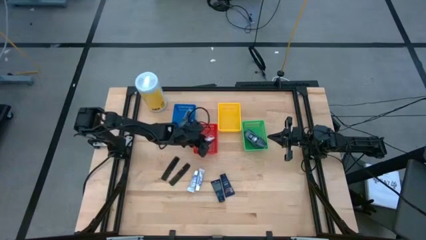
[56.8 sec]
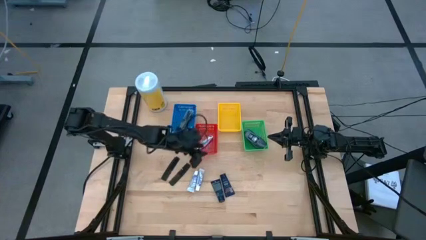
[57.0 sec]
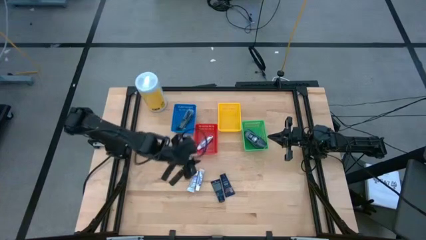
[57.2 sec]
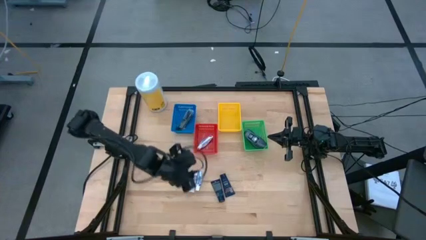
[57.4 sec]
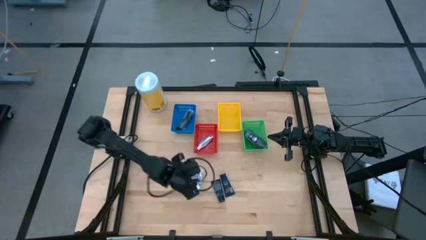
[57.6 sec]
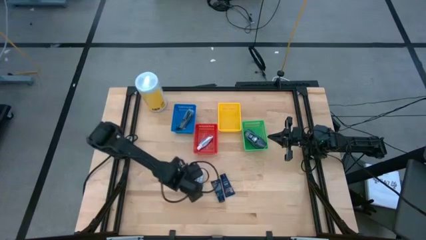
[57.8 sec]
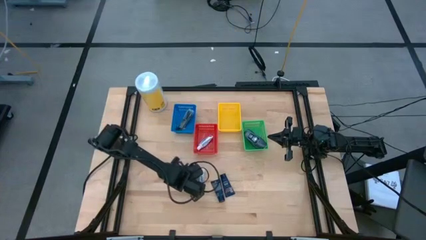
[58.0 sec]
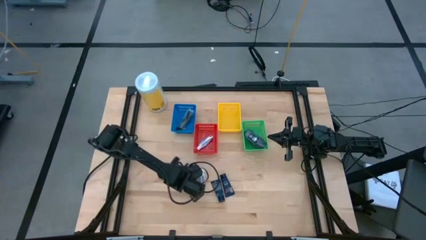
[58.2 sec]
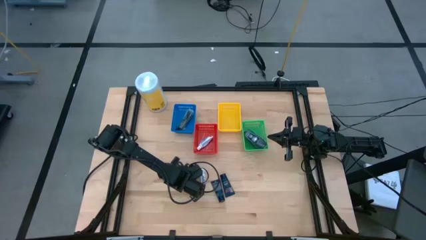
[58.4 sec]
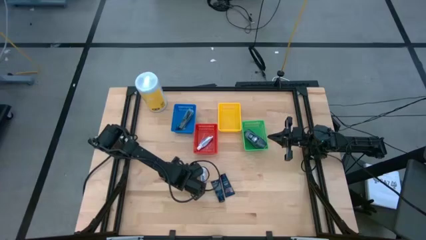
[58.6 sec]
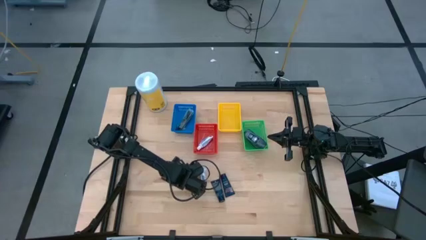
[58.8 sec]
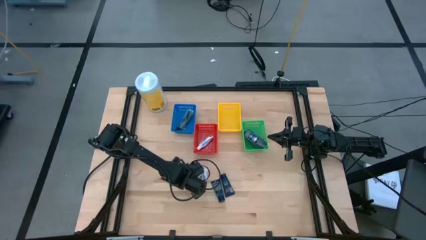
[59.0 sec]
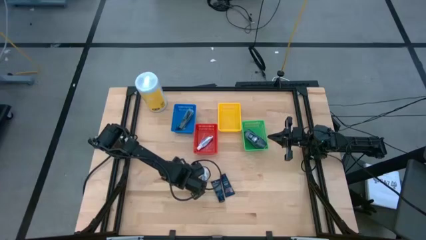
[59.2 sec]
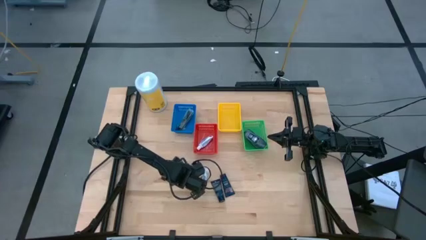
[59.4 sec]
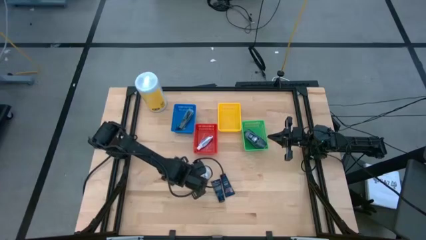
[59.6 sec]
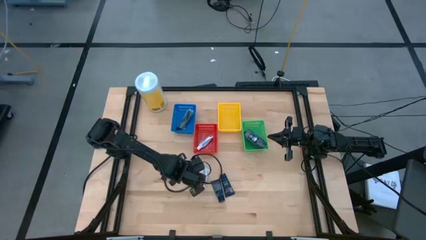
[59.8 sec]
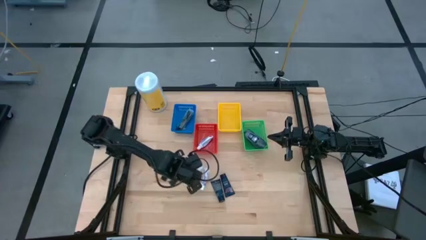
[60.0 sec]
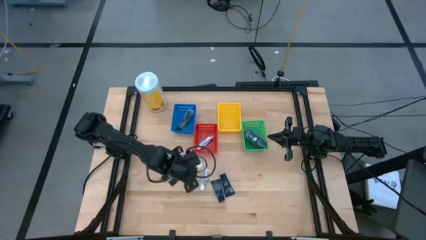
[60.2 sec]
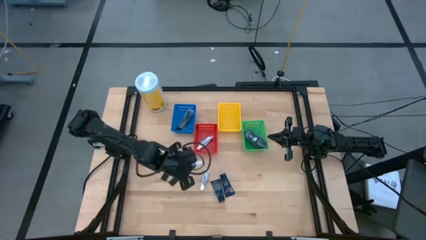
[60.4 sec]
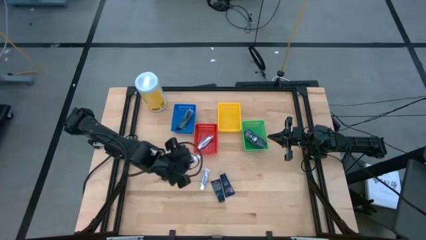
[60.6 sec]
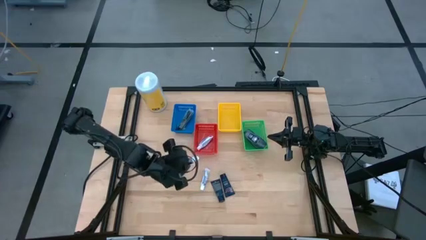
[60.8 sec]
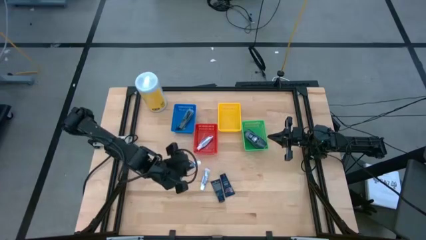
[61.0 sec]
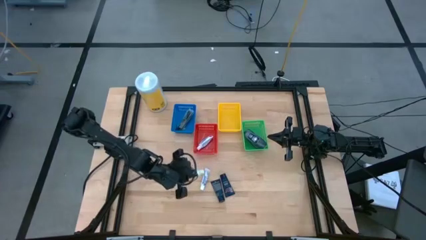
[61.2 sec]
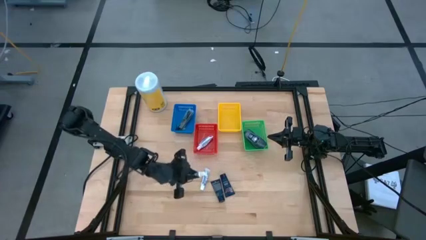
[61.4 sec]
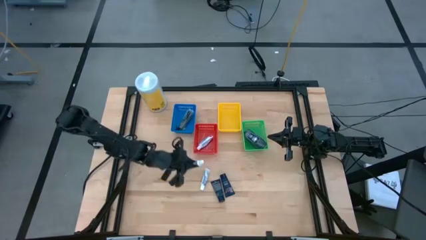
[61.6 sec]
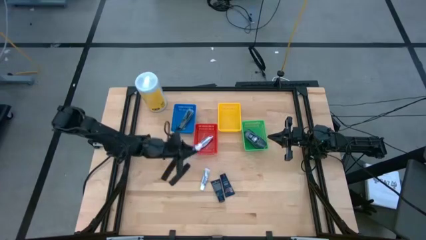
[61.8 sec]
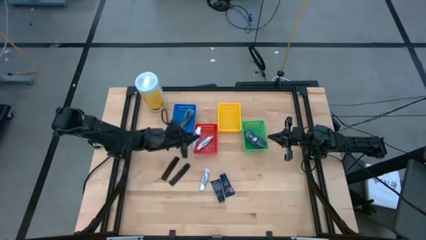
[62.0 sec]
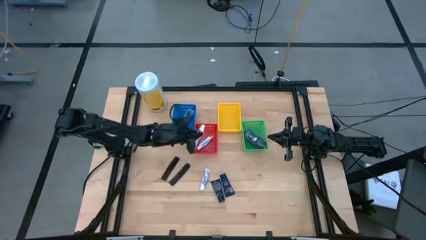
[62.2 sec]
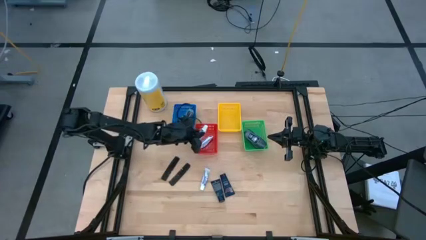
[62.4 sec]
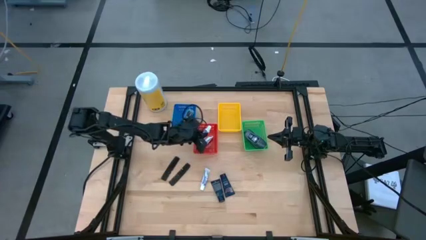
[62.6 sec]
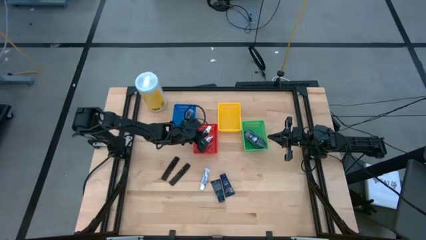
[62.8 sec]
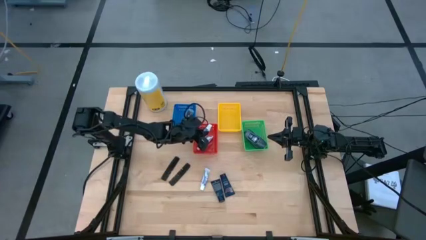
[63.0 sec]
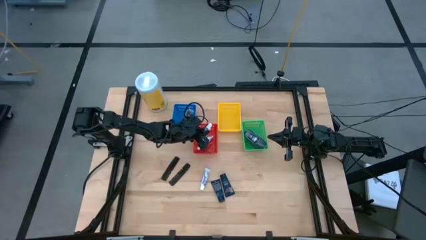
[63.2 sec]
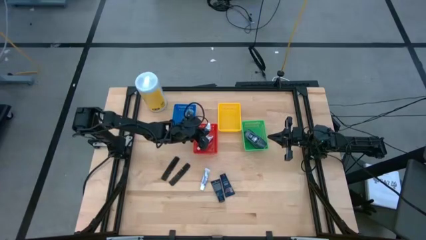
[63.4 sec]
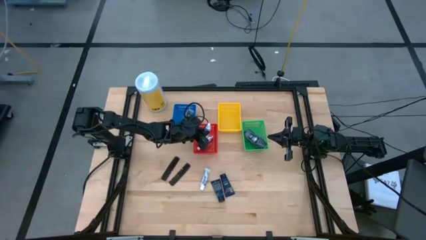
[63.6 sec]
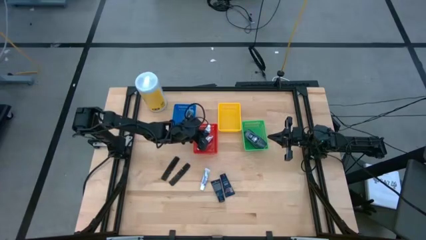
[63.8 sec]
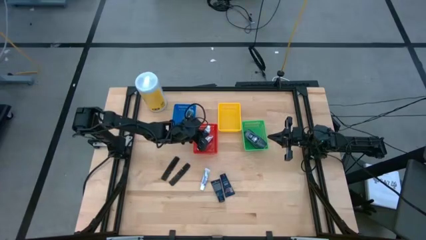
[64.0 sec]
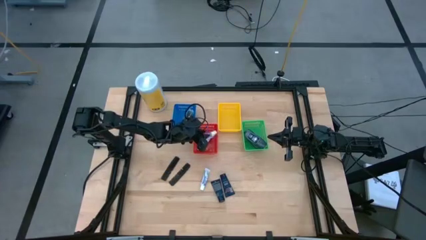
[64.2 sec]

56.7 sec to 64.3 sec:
Task: Pick & Place Travel size toiletries
Put the white toothpaste into the red bin

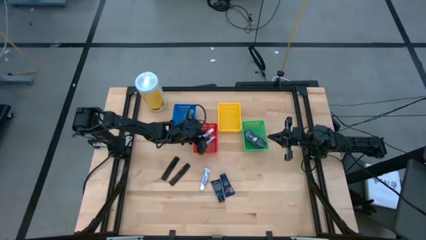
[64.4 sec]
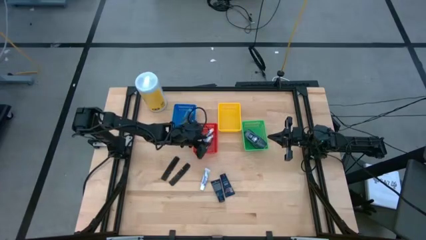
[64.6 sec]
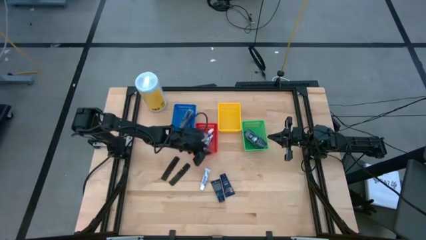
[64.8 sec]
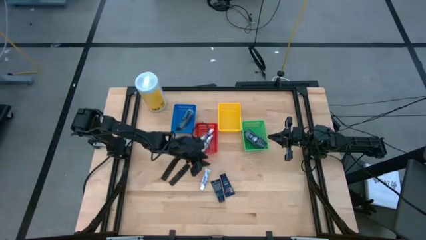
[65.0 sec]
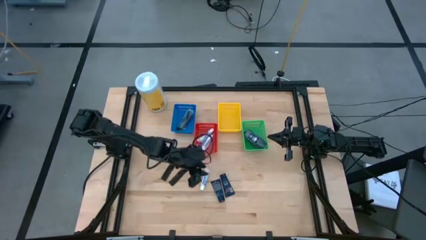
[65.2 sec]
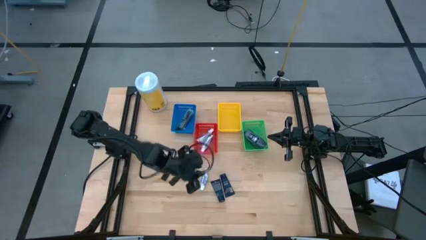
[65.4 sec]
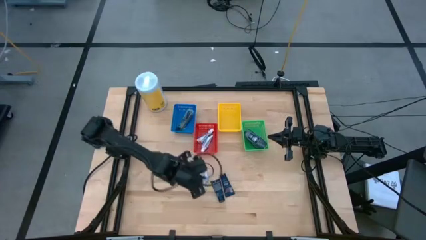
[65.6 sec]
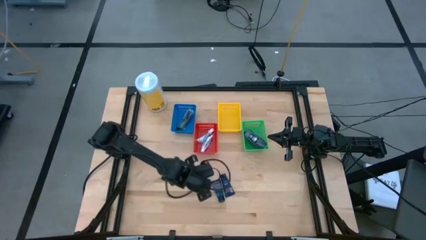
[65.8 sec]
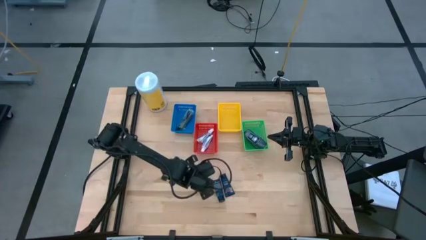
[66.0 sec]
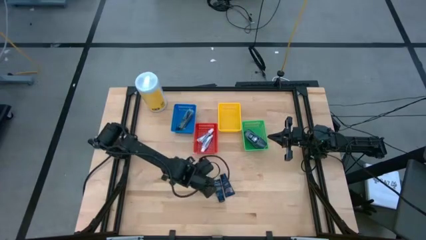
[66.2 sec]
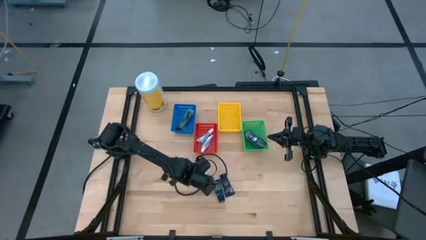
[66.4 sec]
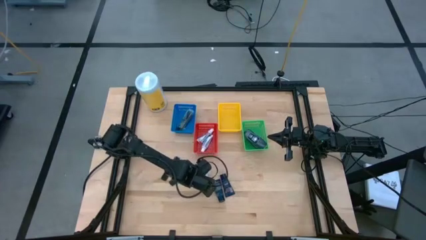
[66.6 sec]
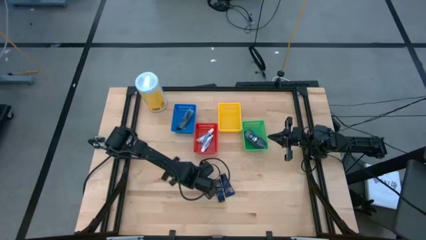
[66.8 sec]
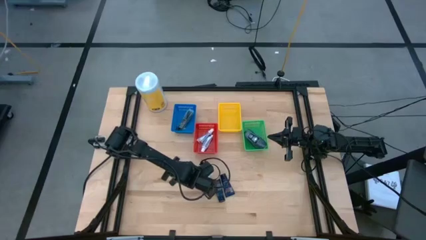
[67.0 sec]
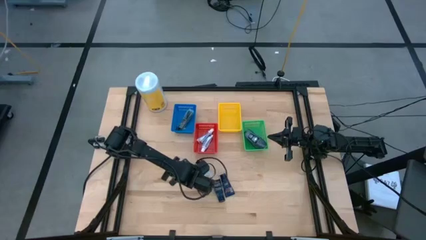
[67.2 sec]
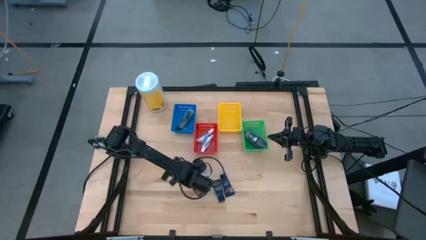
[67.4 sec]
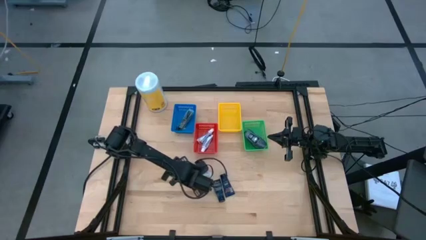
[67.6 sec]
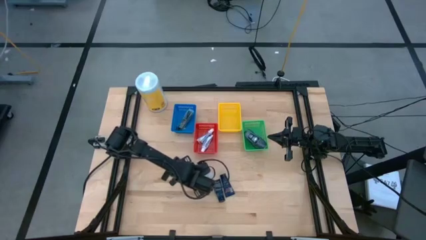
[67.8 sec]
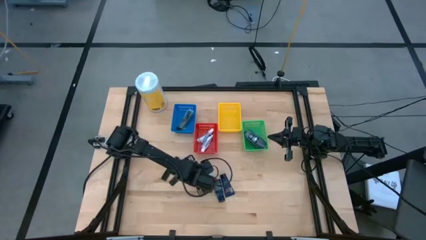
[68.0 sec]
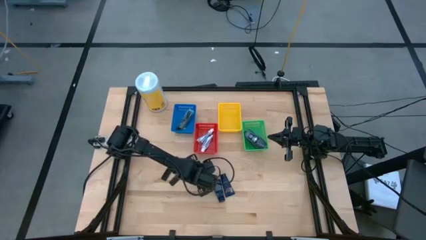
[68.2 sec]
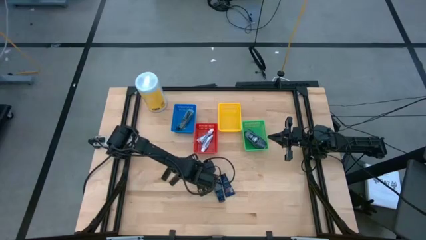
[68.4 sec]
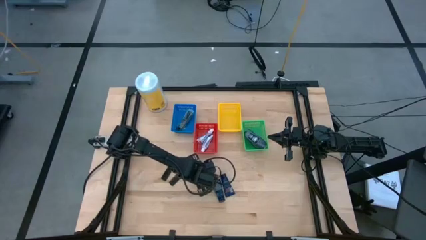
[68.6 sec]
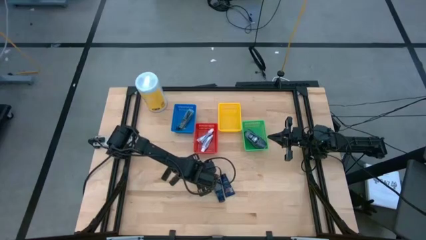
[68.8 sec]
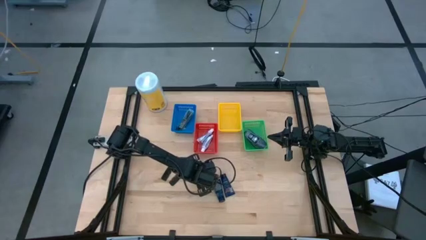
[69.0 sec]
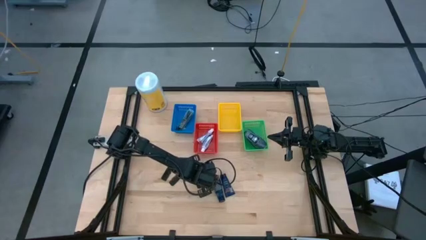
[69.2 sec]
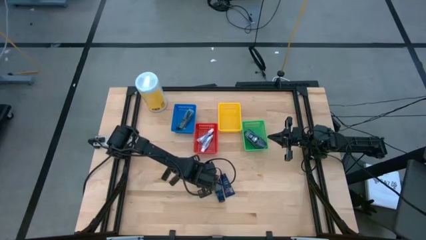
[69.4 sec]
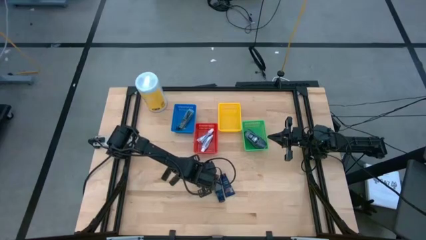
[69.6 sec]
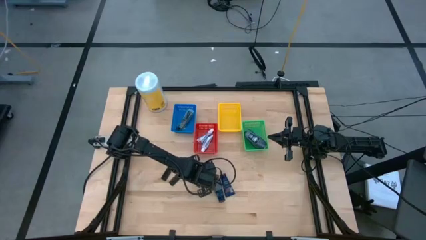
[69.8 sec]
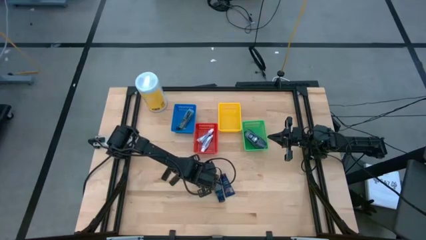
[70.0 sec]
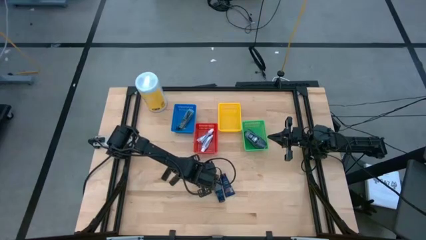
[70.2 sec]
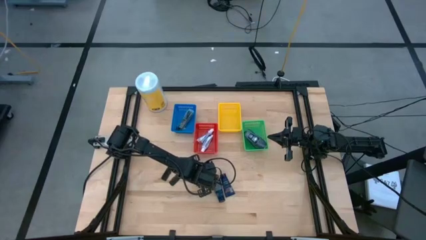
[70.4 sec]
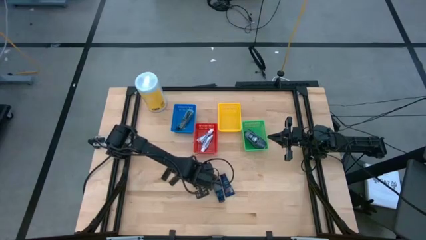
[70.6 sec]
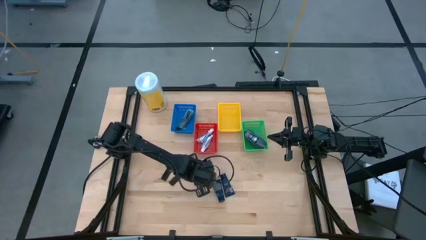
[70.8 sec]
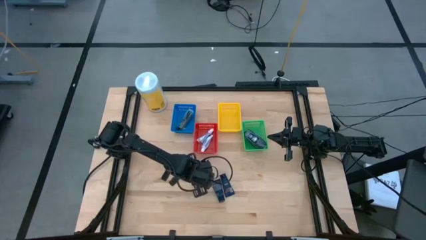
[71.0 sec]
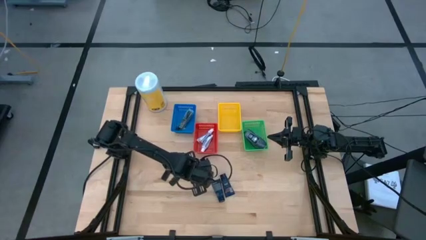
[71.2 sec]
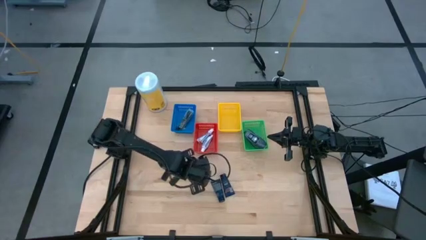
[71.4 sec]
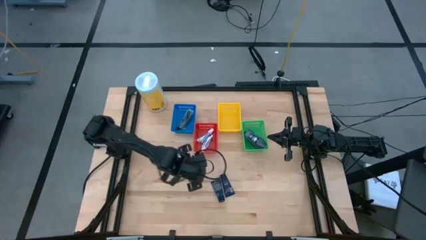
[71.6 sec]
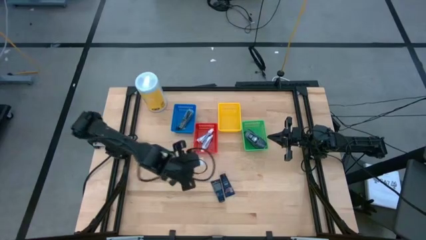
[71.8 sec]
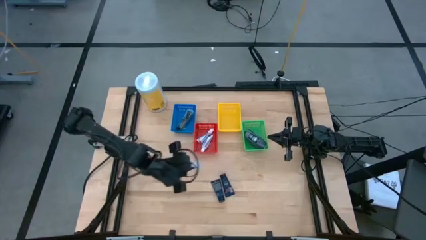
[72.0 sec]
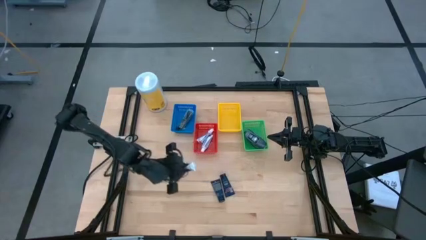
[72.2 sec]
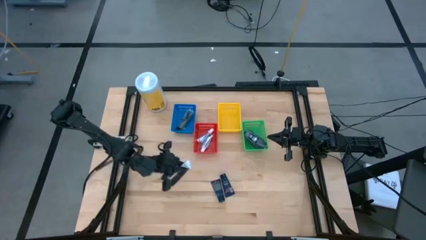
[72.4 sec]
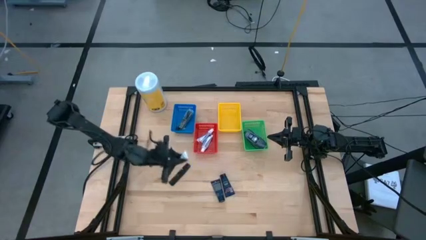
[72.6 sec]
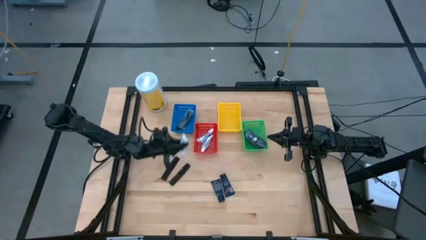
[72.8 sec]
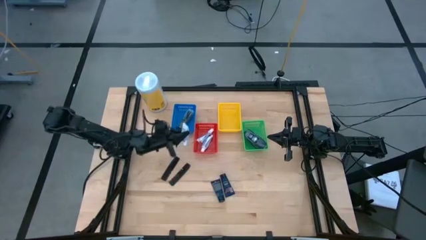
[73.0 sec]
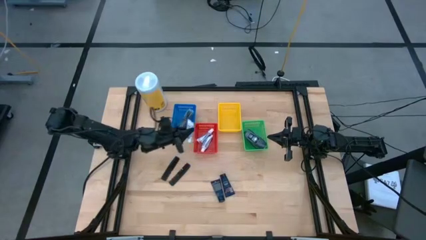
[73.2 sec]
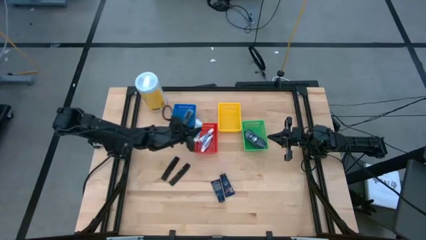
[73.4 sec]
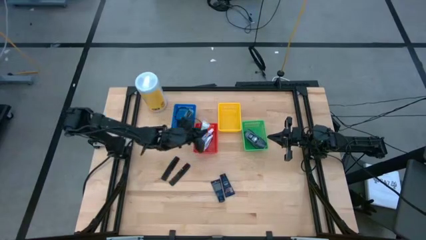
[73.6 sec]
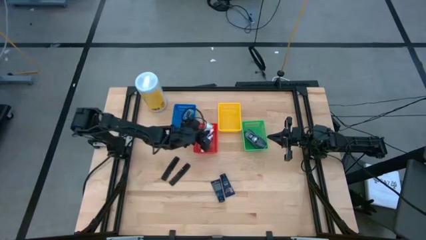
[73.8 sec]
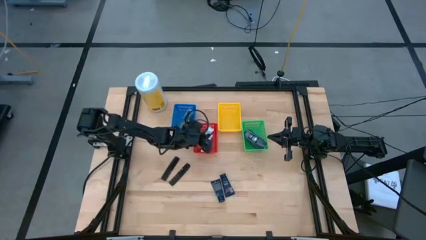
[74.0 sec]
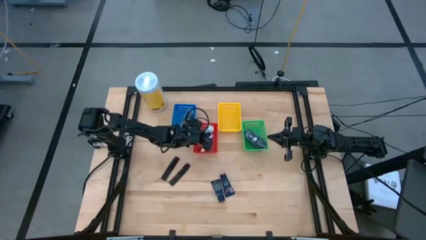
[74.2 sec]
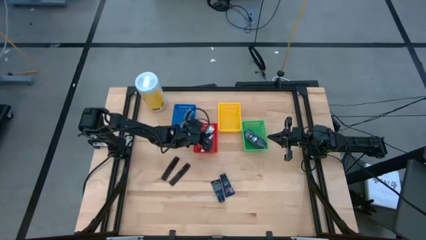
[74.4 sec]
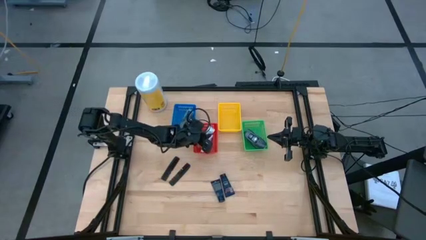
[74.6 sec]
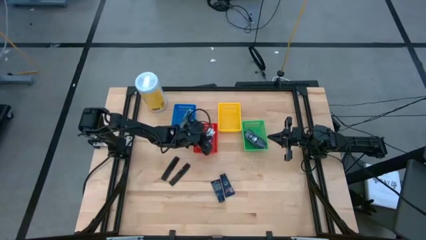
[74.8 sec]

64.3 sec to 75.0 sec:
Put the white toothpaste into the red bin
